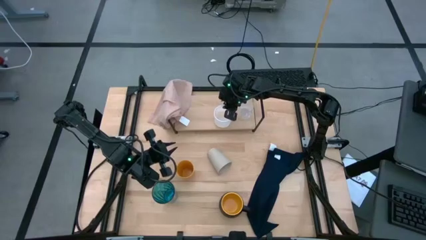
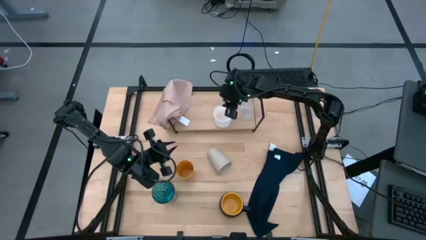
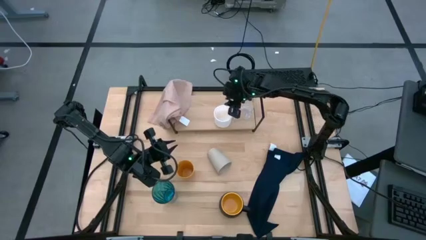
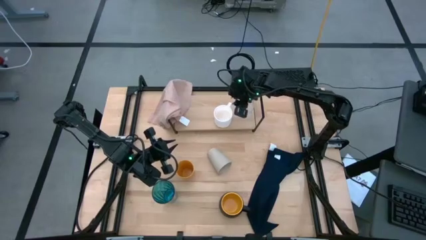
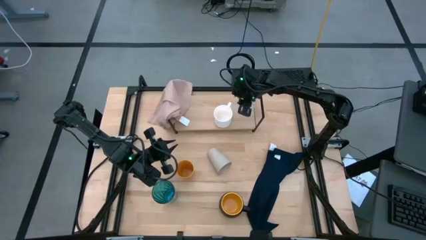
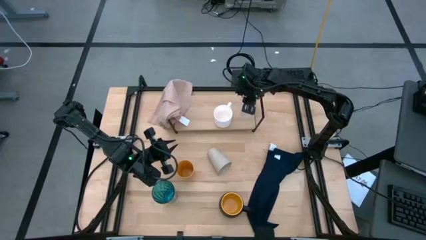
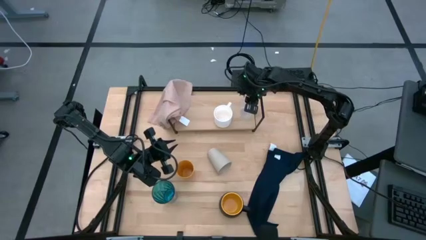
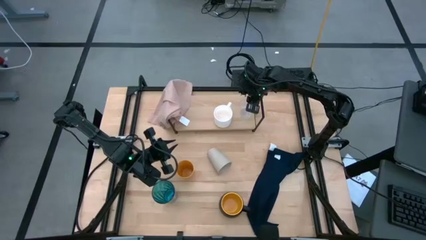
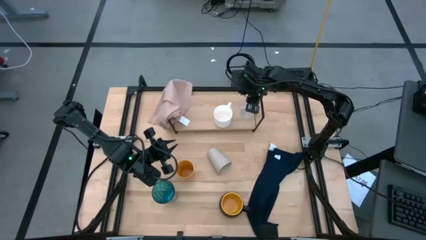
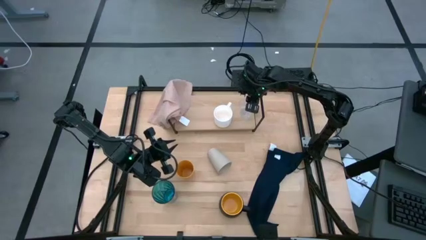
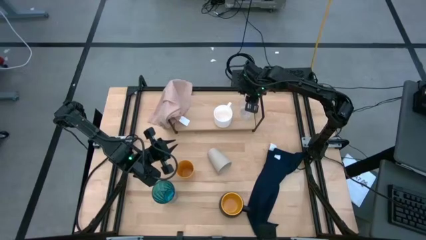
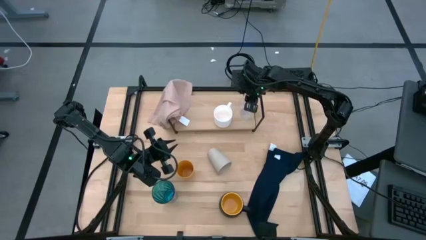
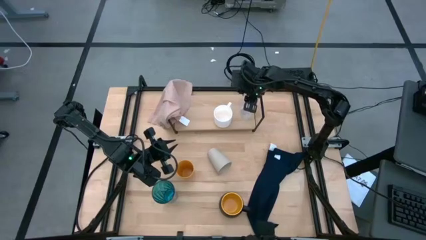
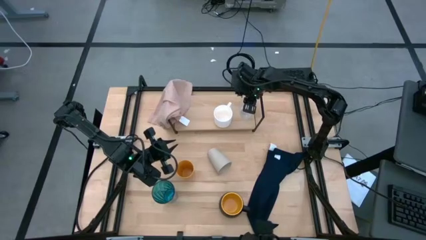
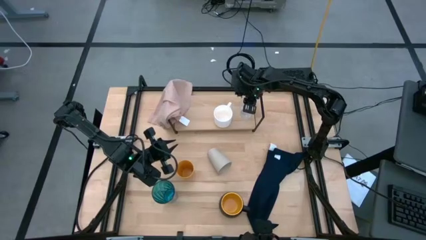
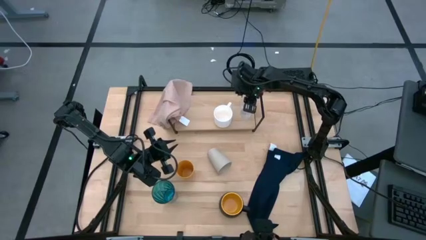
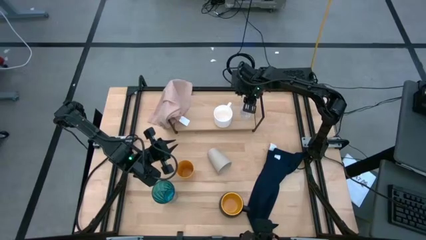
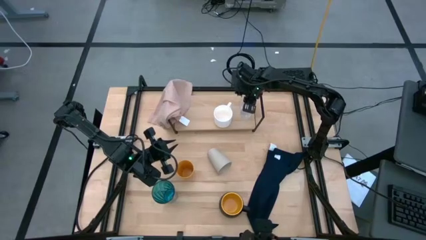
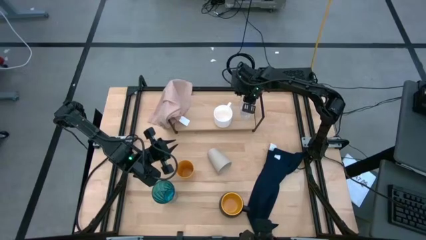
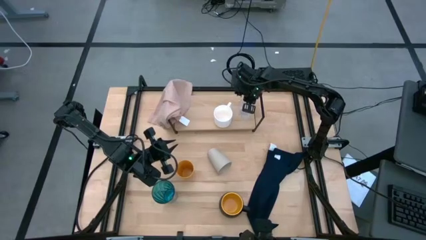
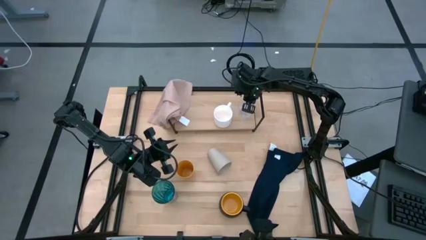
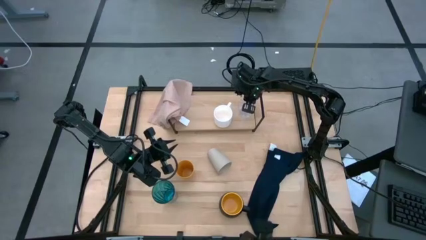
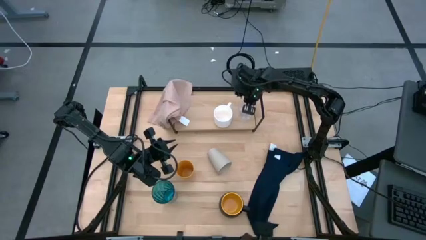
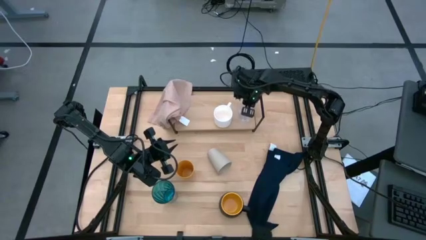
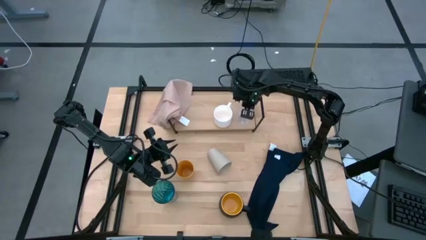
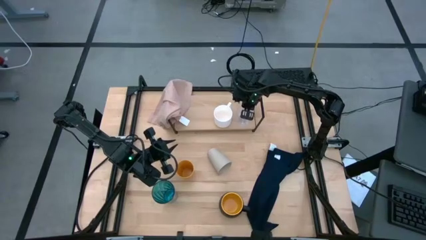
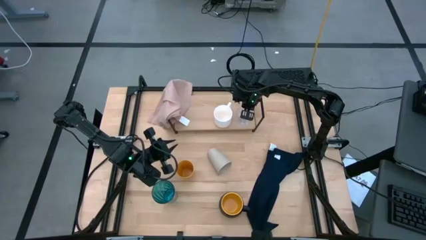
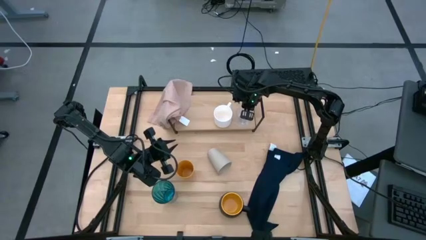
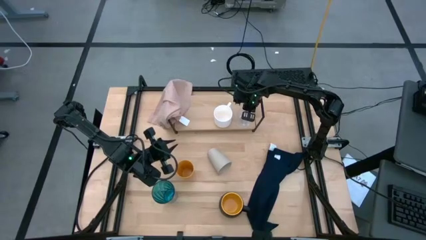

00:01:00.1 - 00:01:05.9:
Task: Stack small to large cups/mugs on shelf
Adjust the transparent mug on the shelf

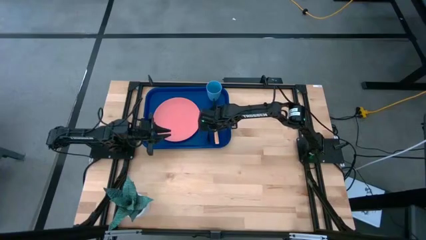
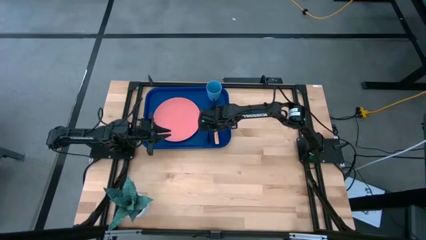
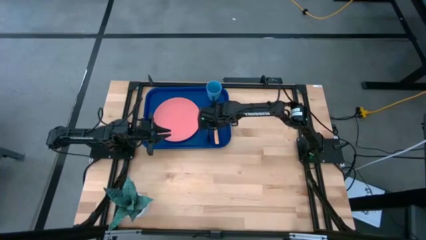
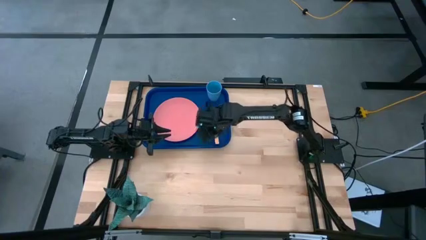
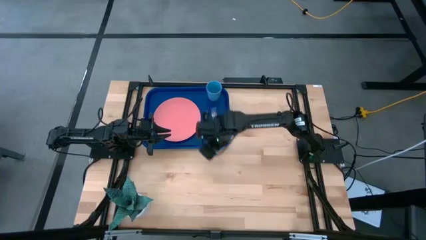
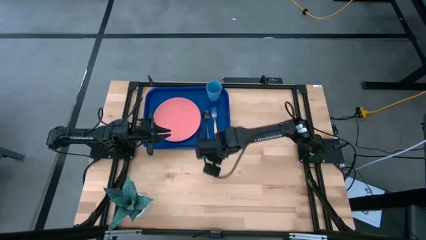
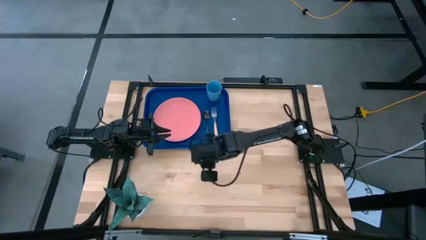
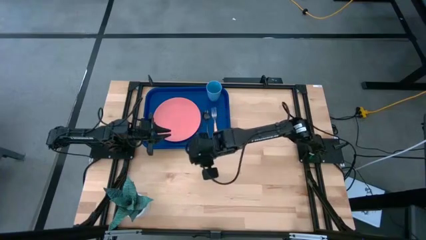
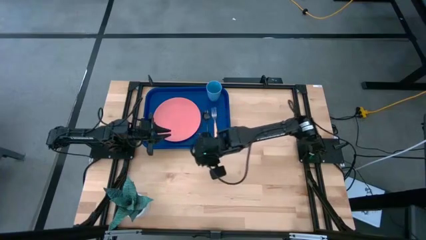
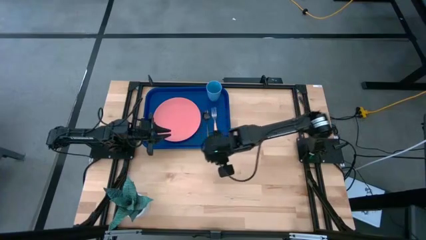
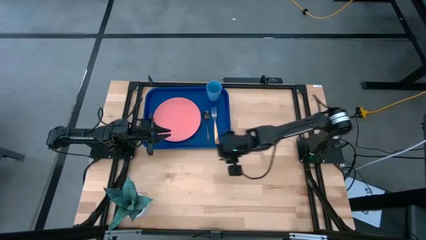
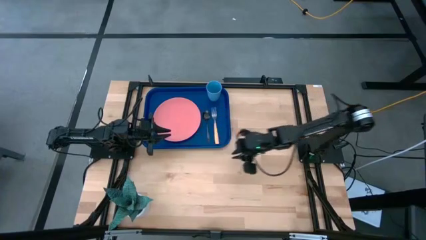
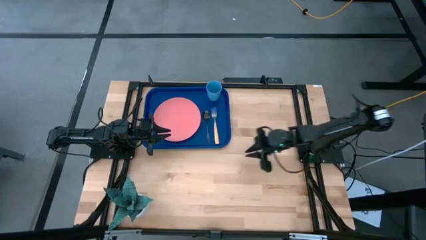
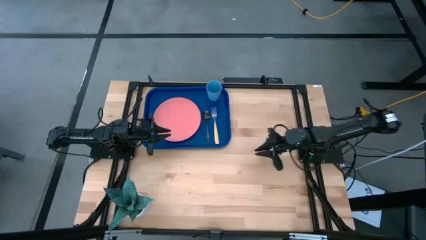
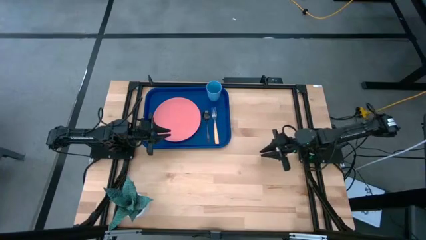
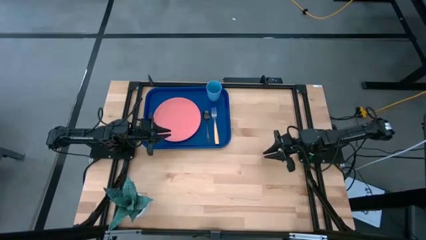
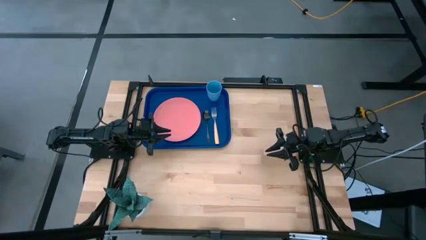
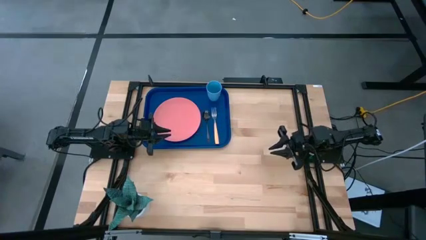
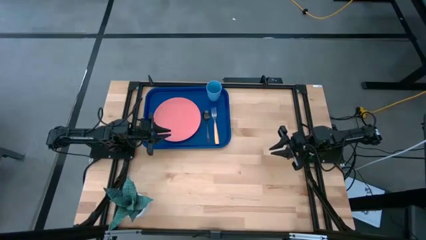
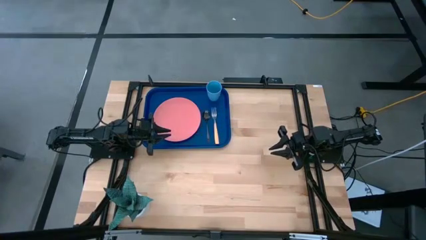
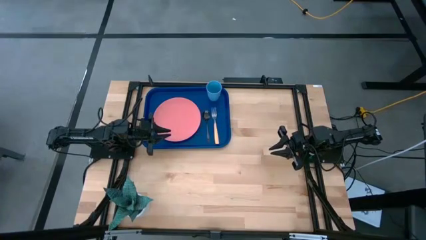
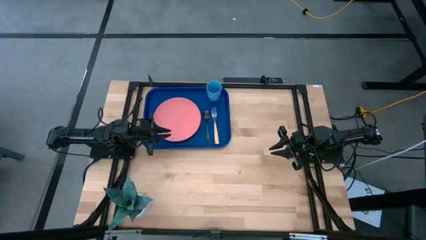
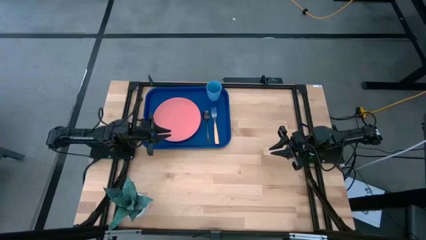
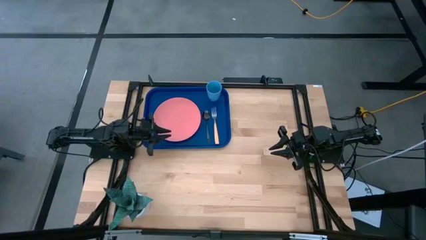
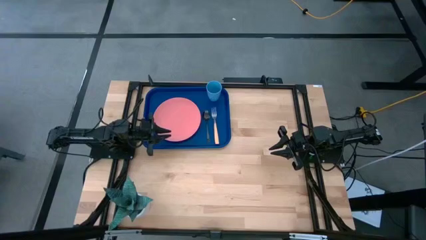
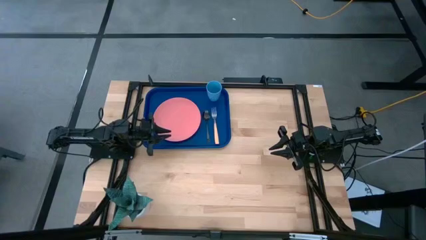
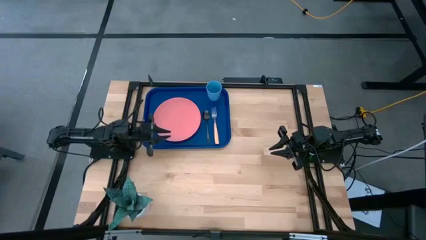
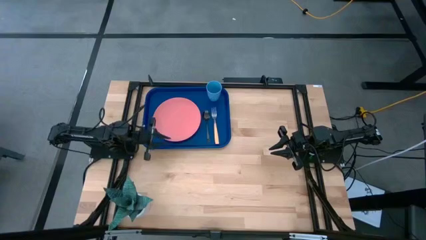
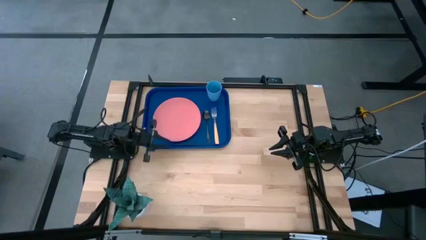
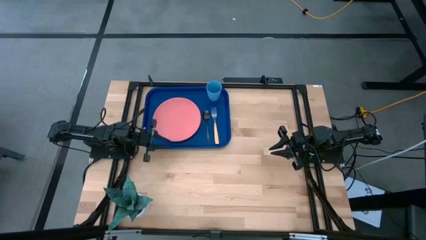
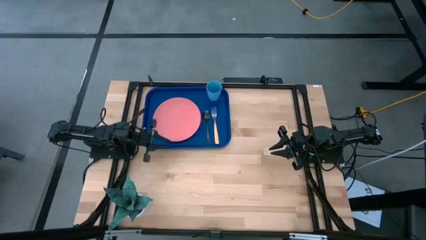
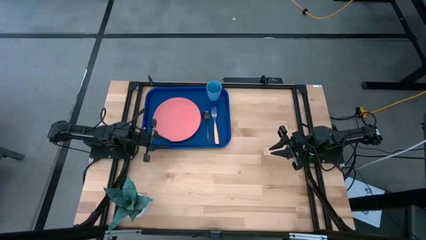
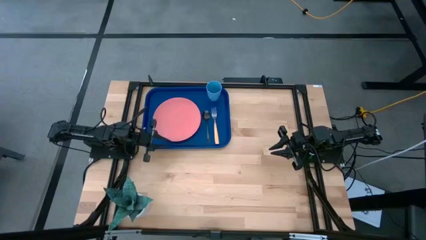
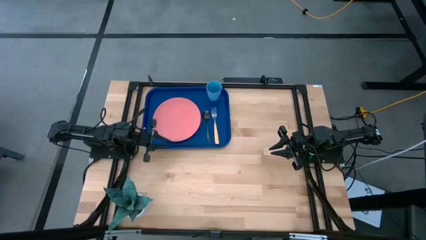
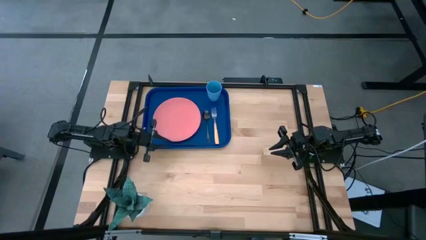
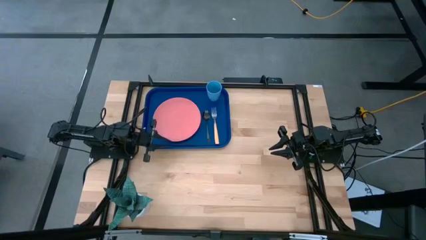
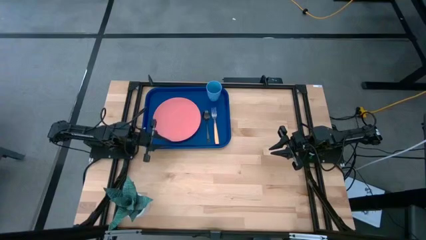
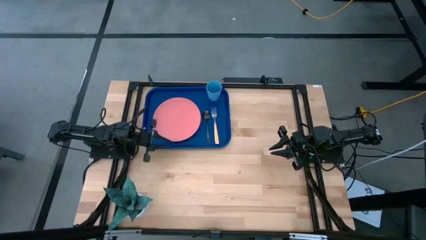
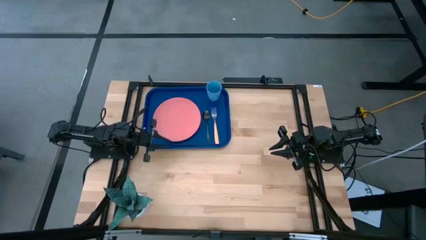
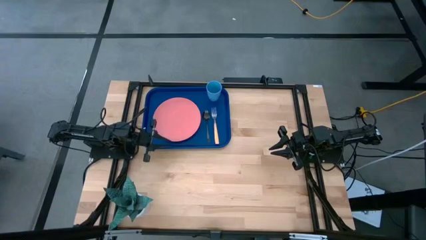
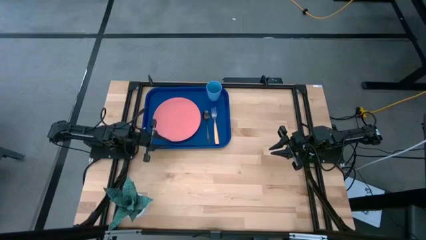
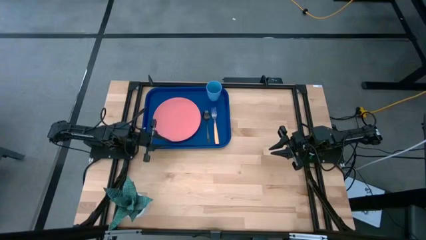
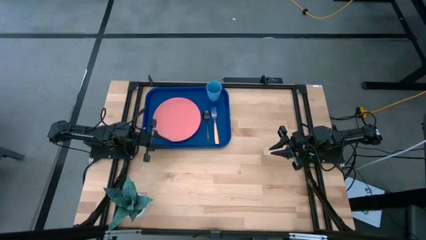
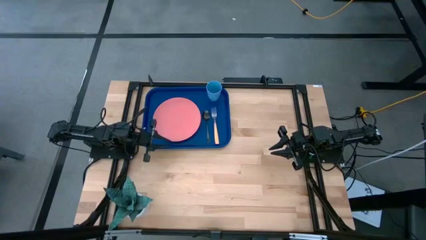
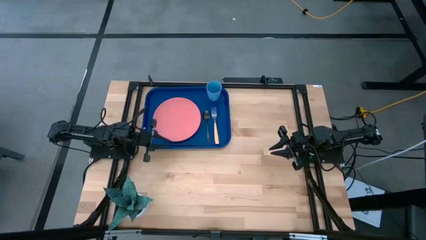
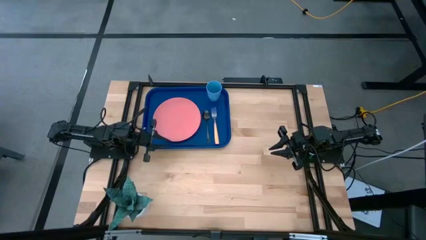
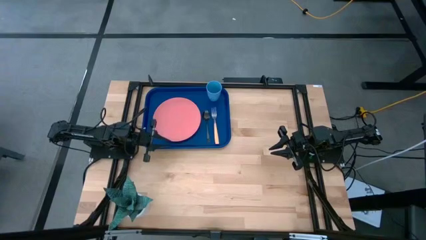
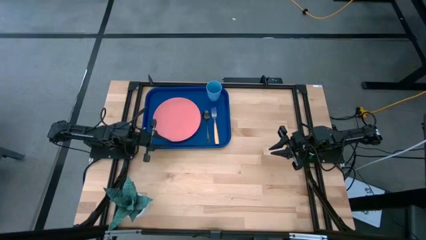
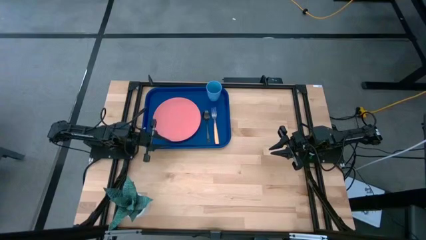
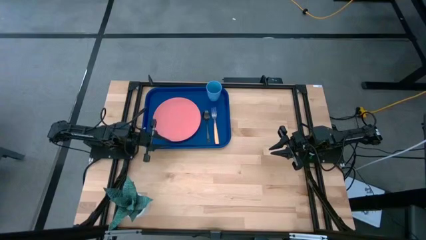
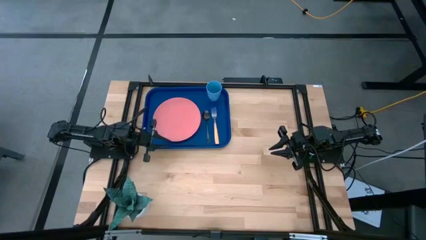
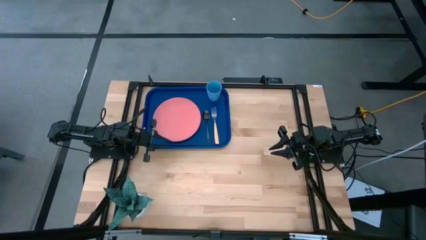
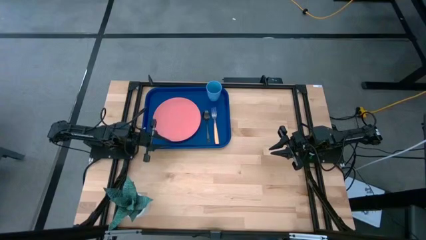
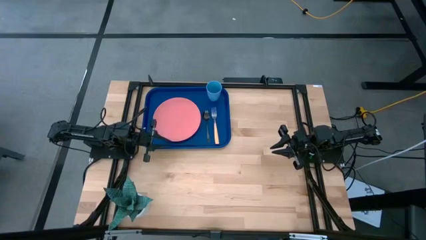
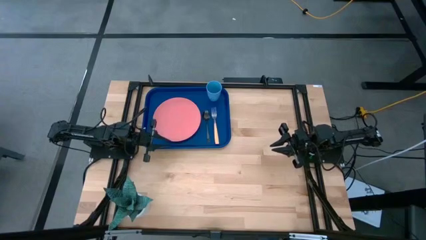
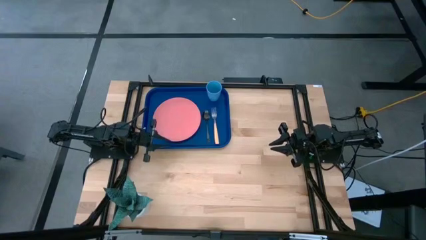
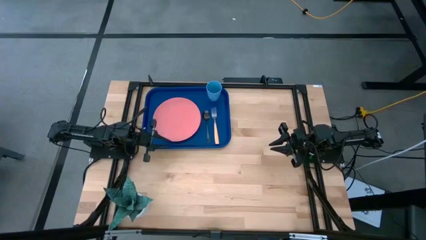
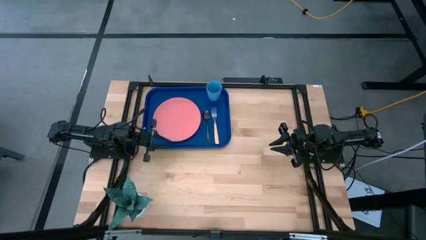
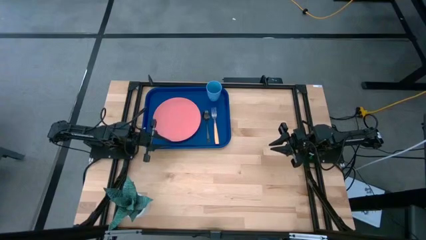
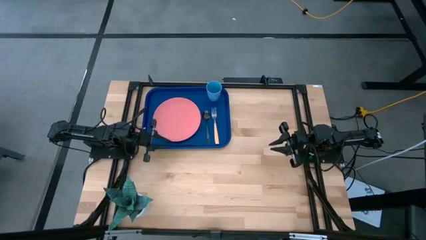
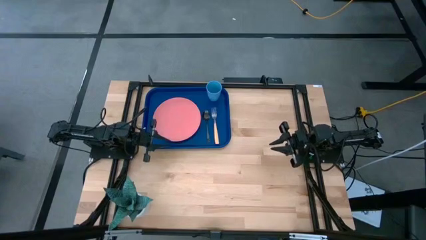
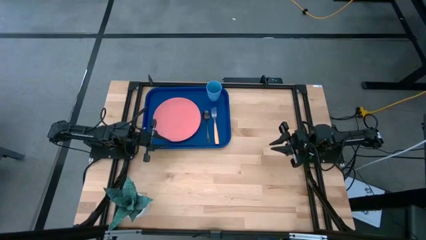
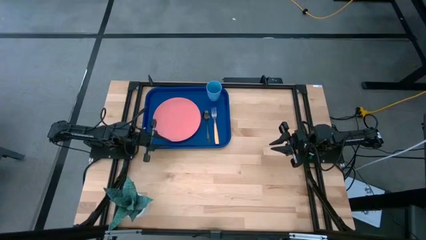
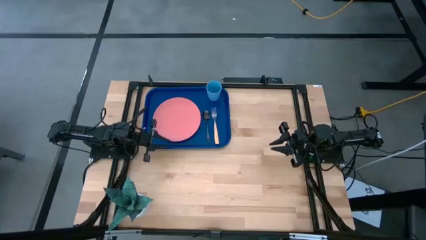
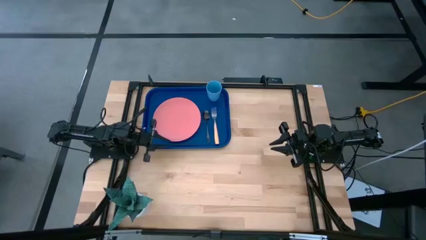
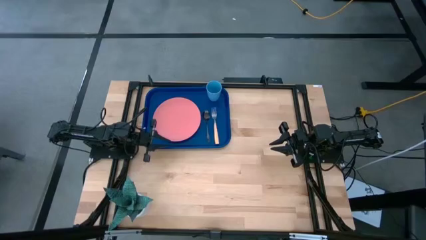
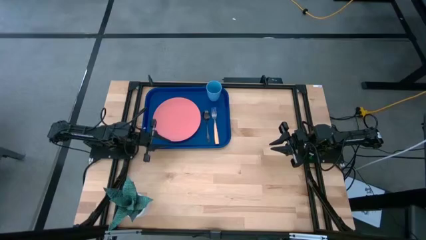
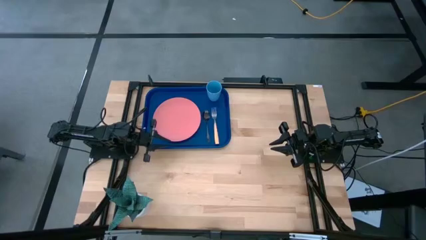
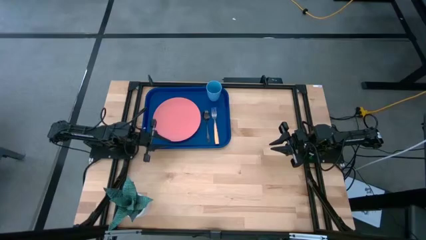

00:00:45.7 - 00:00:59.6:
Task: Pick and place plate/cup/fork/spoon on tray
Return to Home Position
